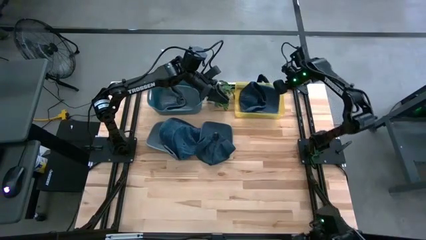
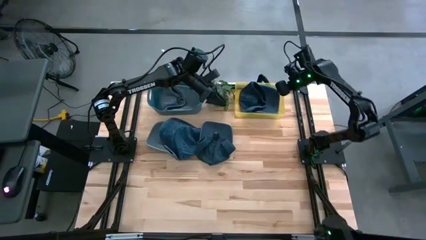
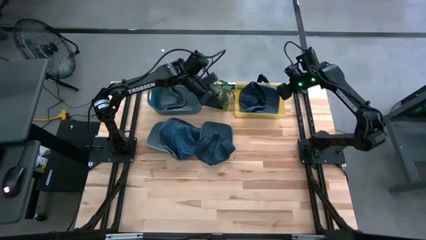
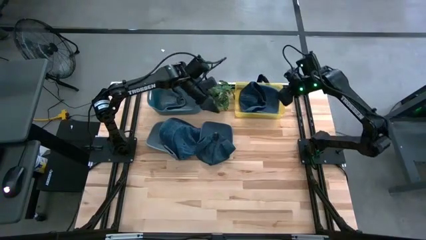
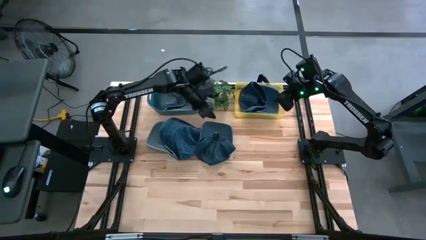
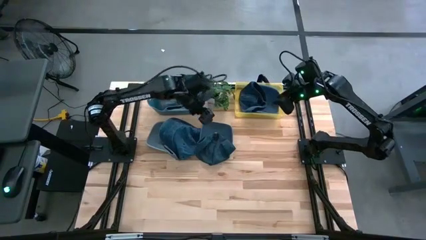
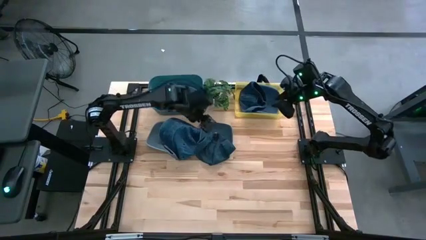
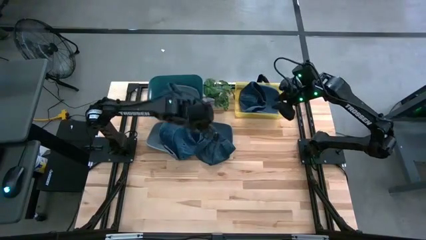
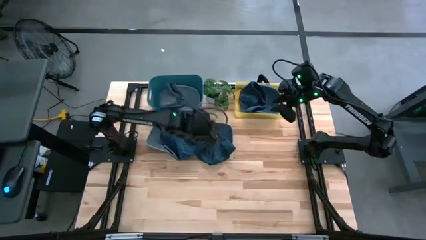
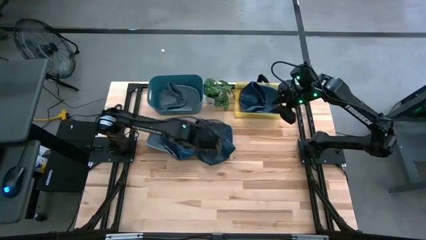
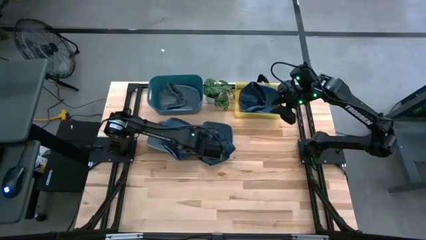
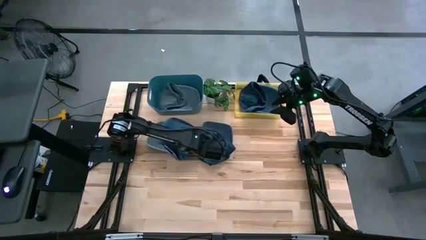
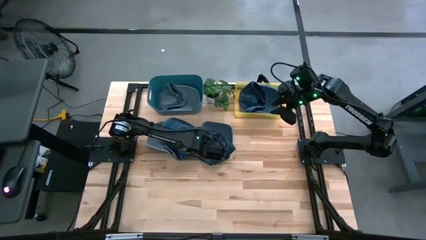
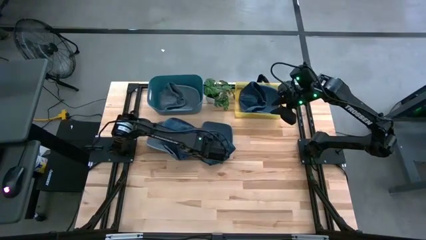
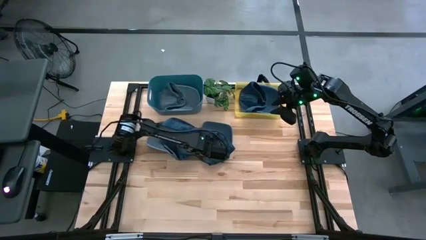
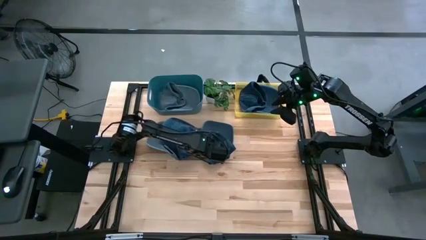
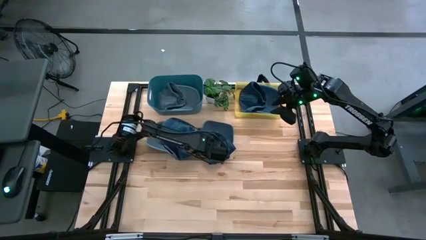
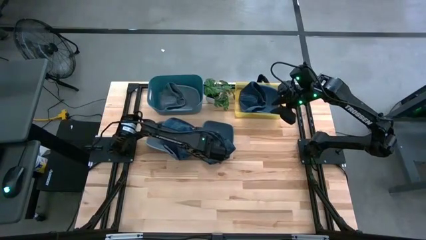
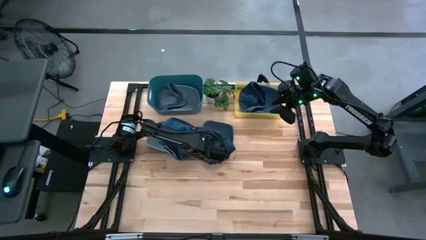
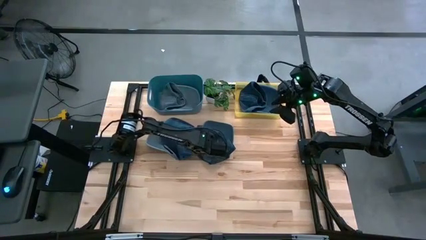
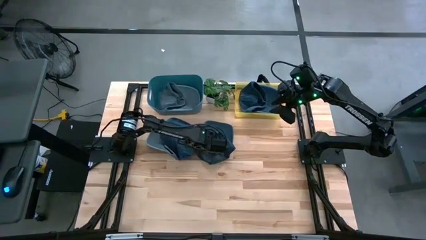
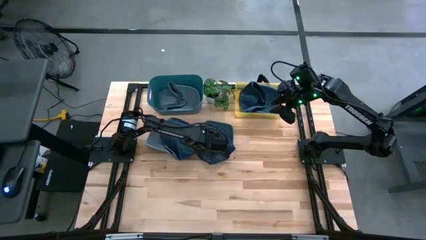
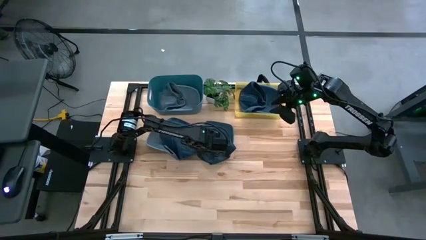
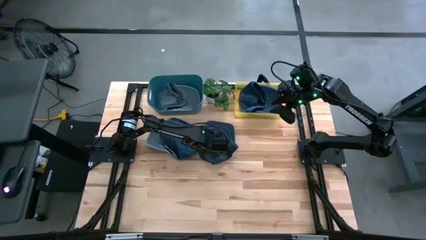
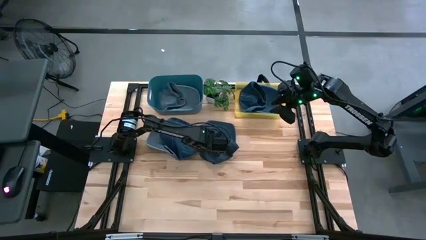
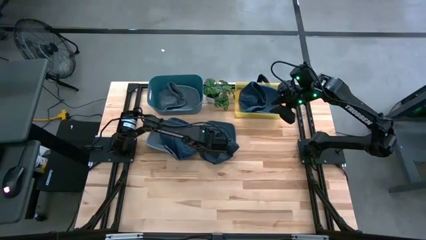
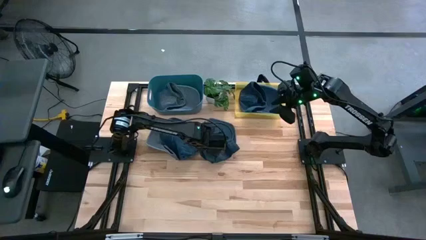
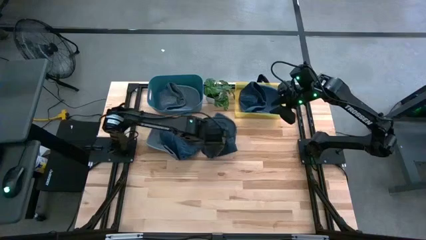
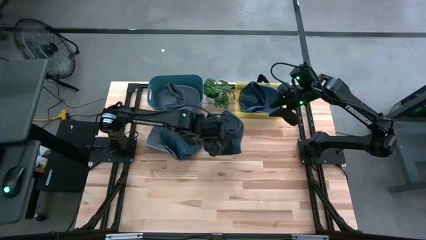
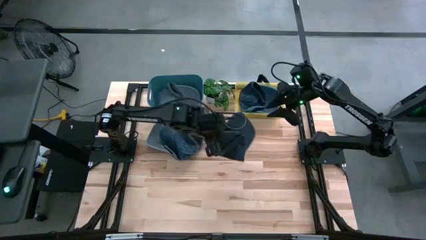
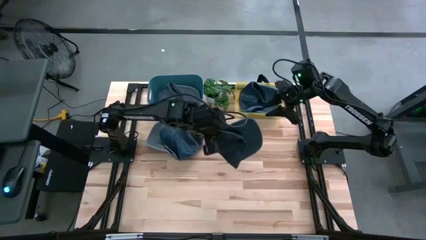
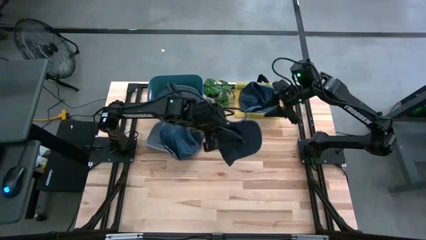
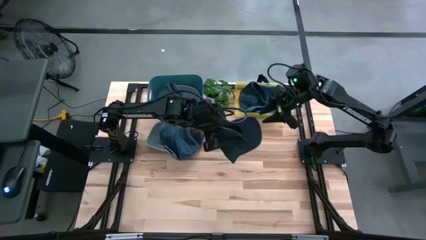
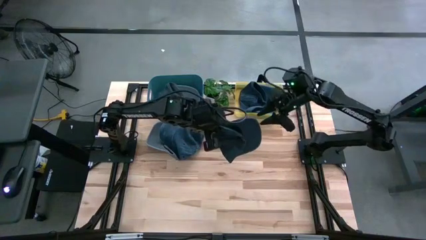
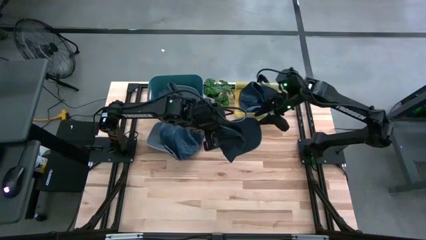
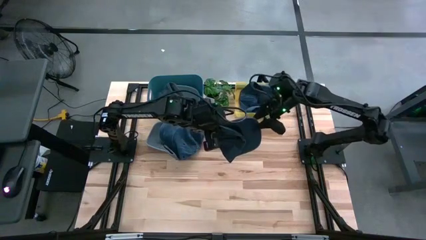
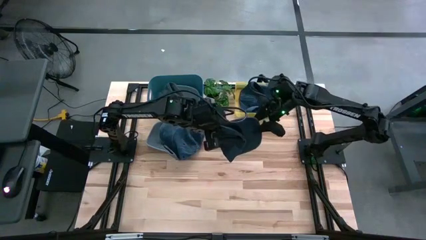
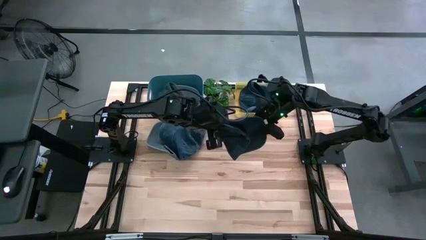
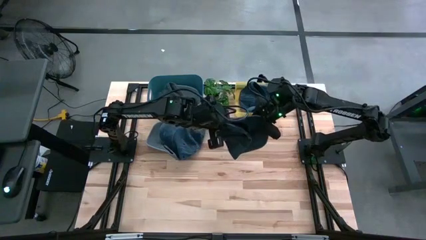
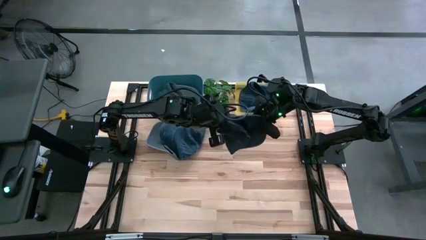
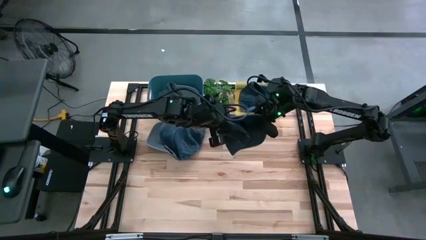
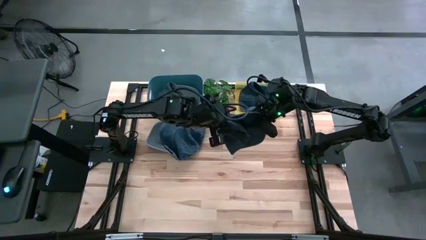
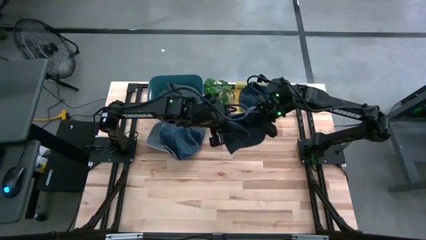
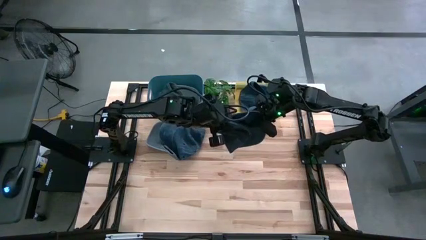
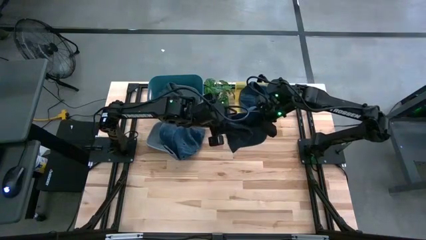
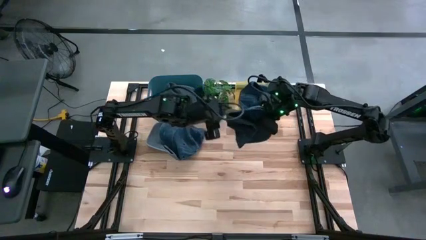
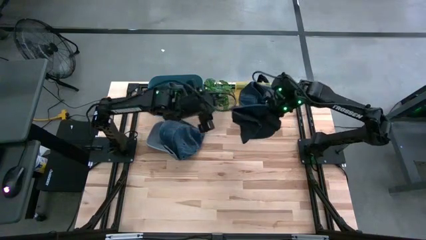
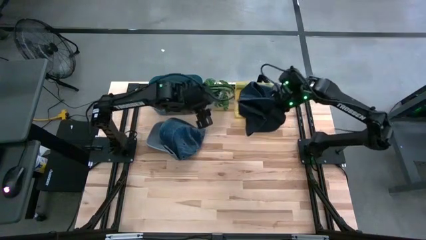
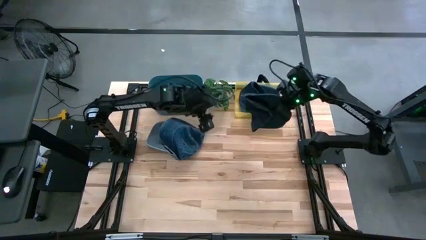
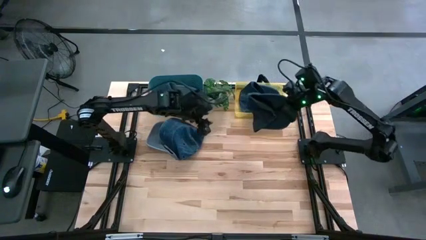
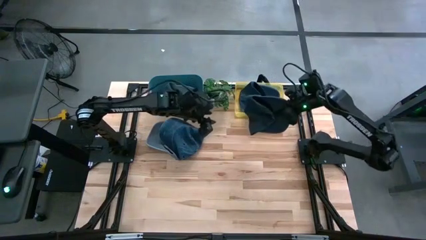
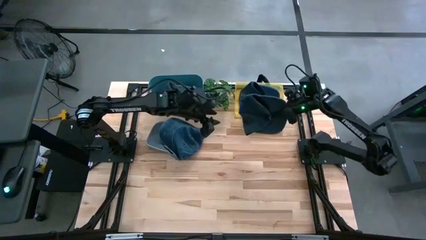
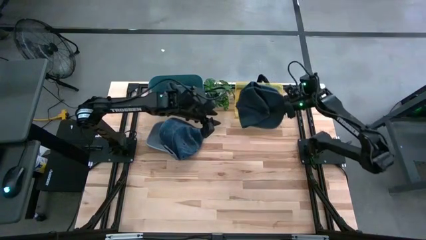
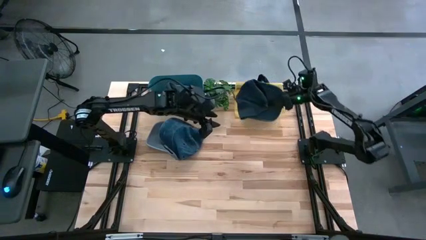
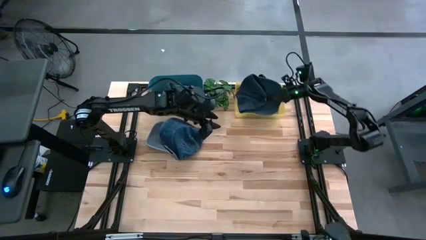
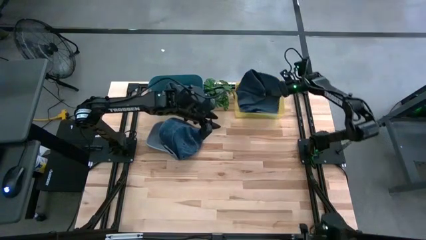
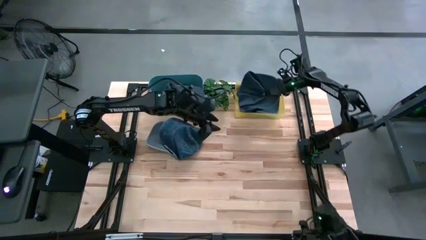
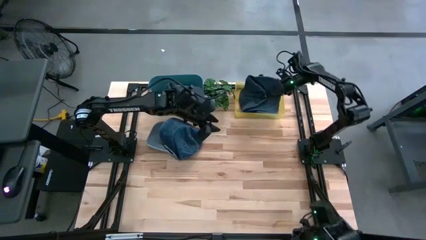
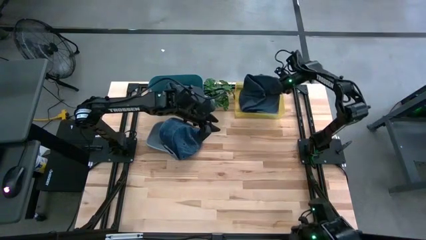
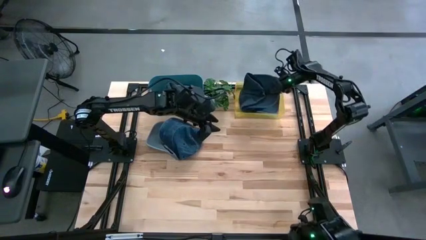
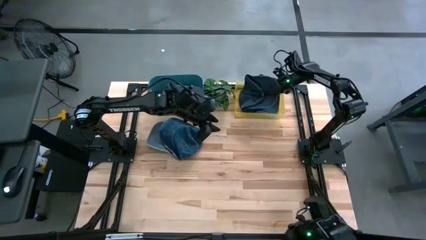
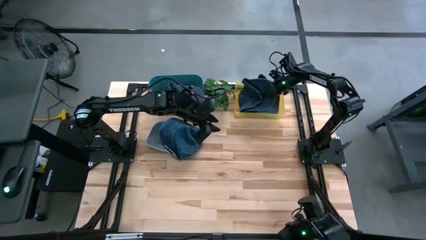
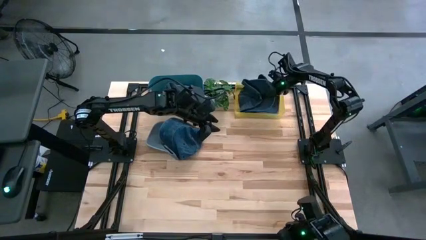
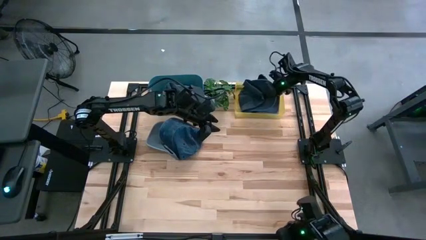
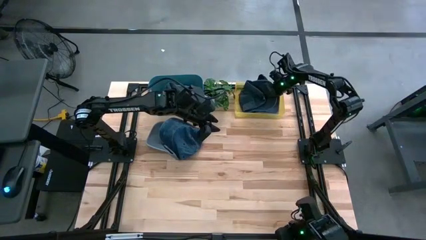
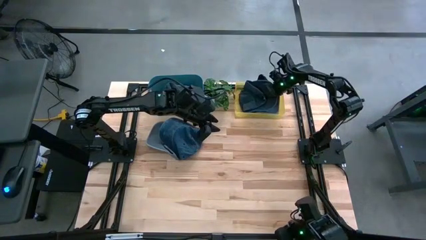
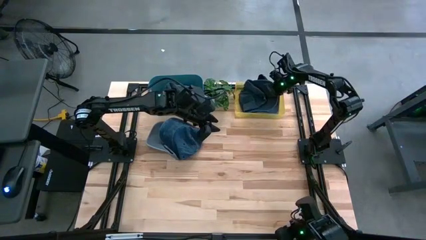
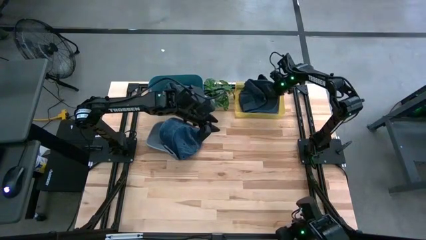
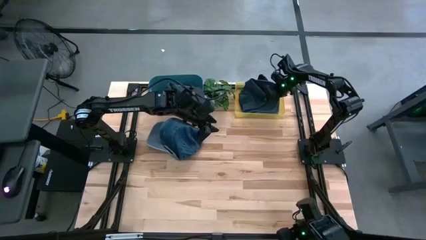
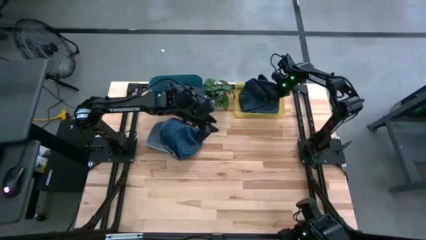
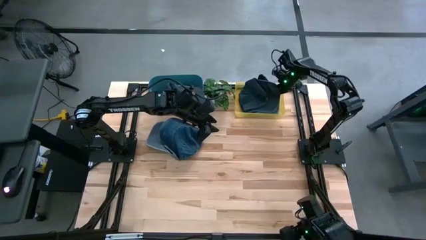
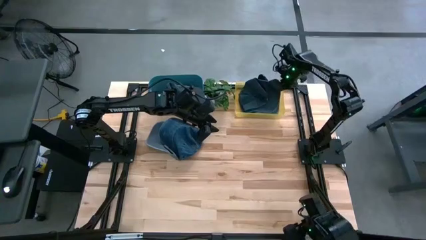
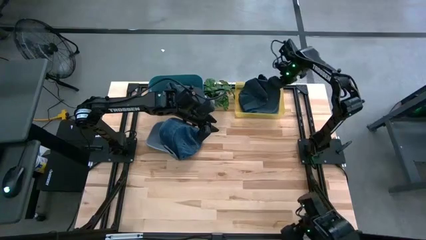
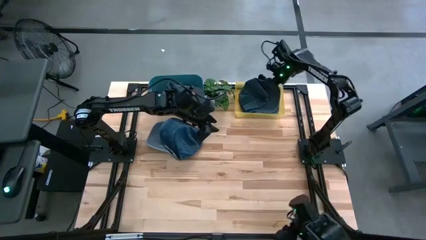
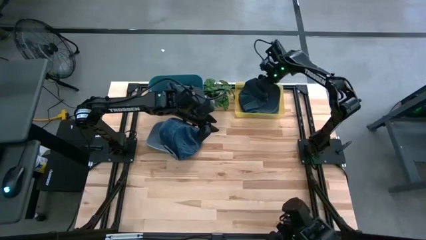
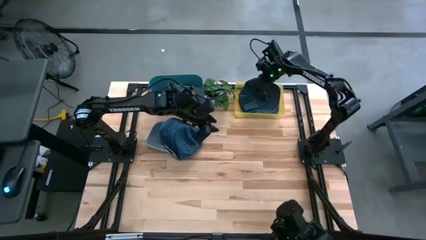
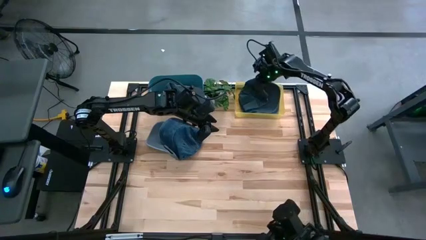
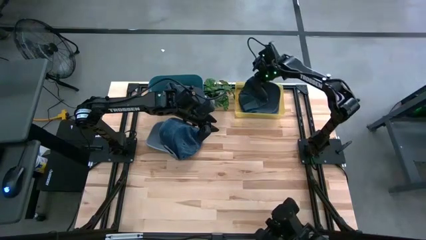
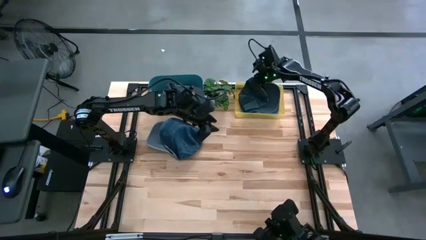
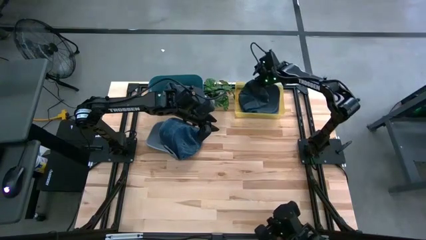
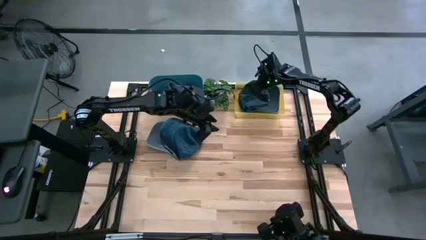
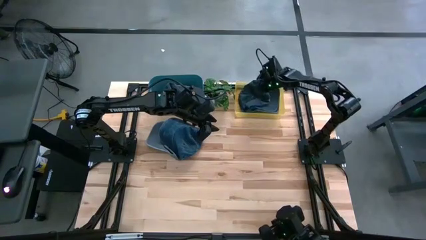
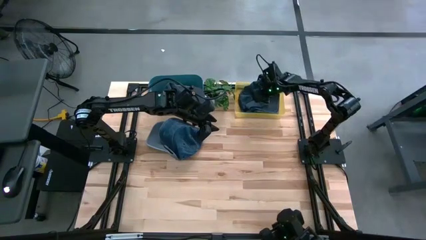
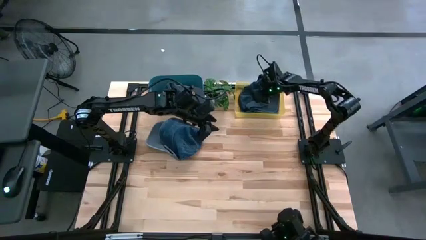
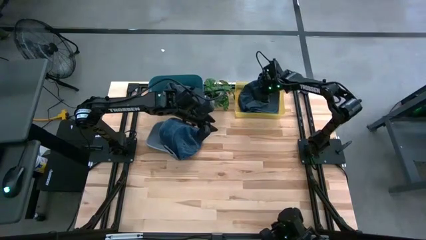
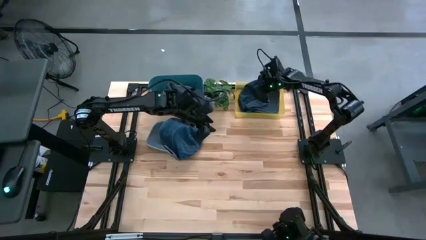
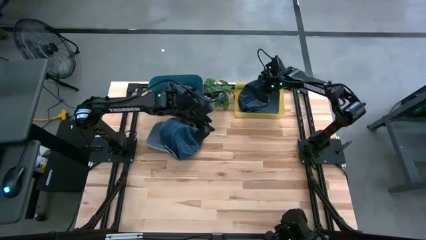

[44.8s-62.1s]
Task: Pick & Place hat
Put the right blue cap into the yellow bin
